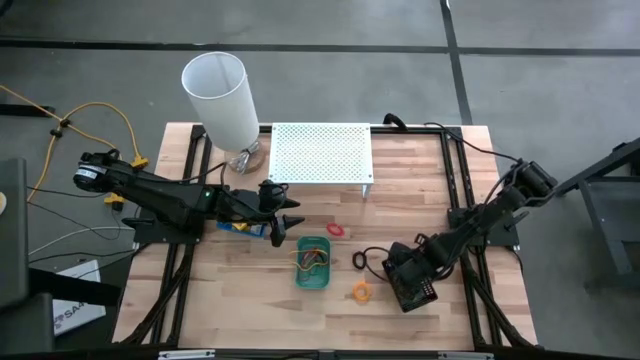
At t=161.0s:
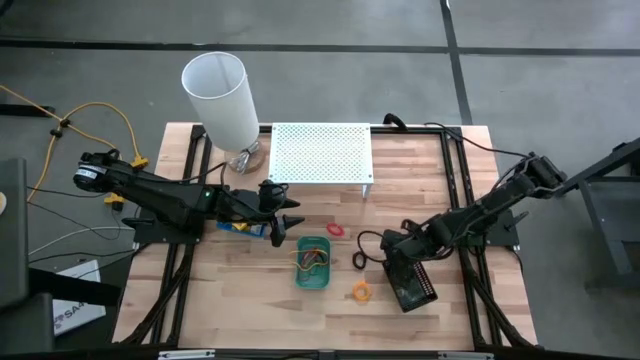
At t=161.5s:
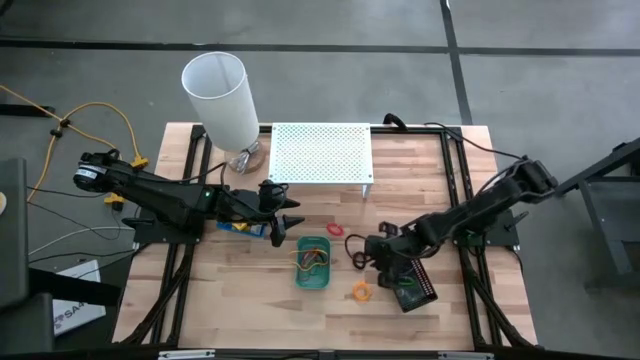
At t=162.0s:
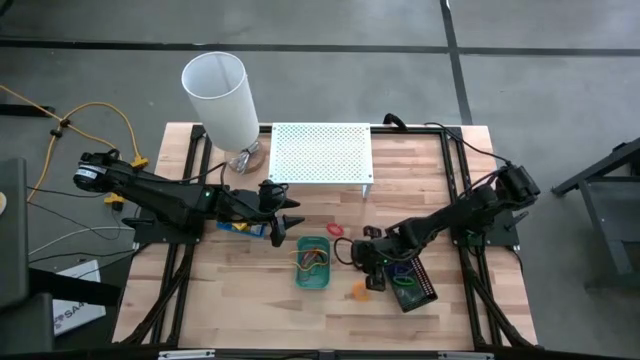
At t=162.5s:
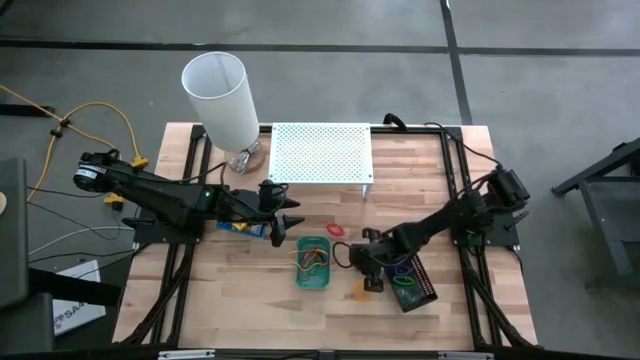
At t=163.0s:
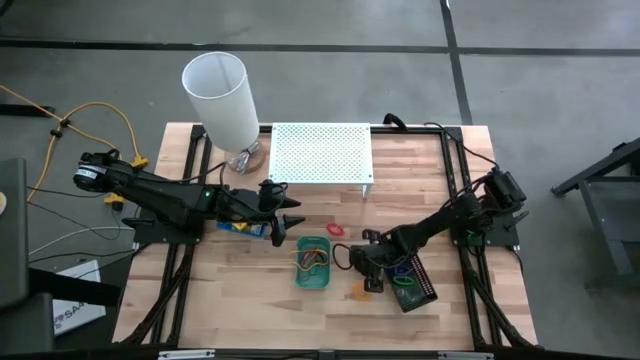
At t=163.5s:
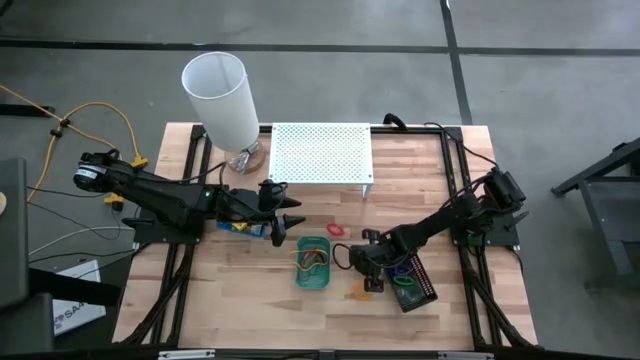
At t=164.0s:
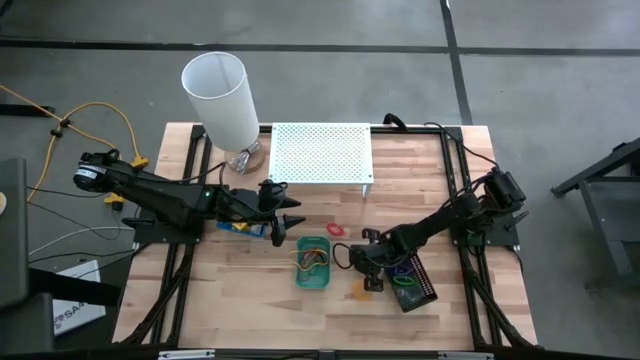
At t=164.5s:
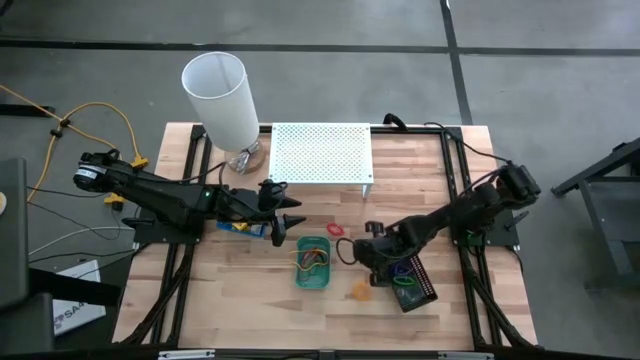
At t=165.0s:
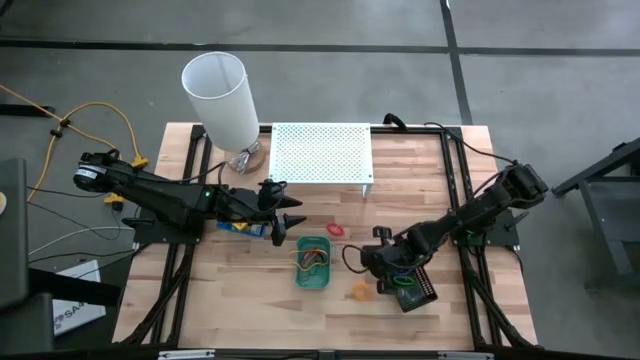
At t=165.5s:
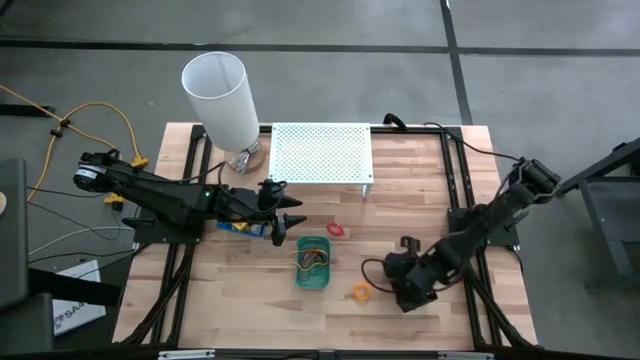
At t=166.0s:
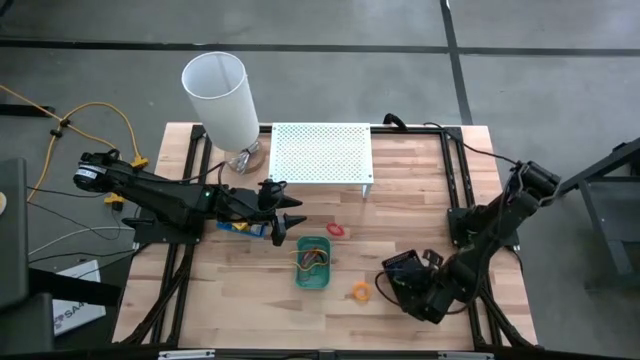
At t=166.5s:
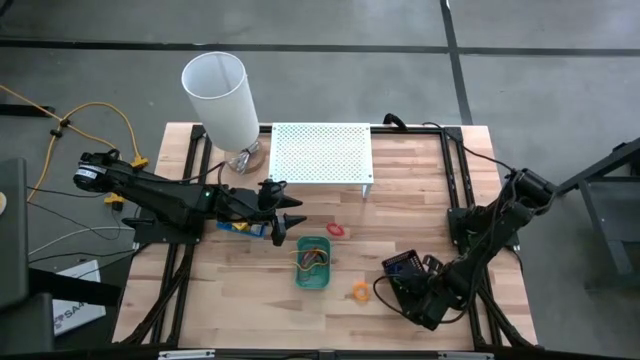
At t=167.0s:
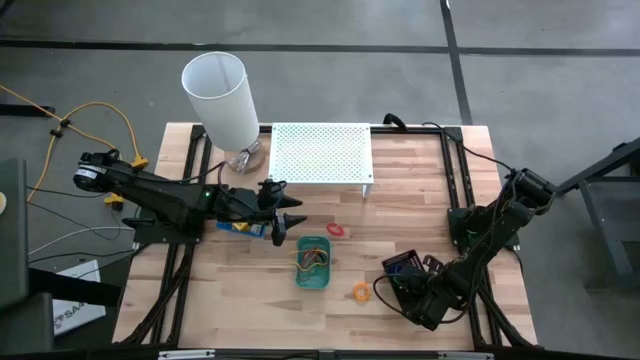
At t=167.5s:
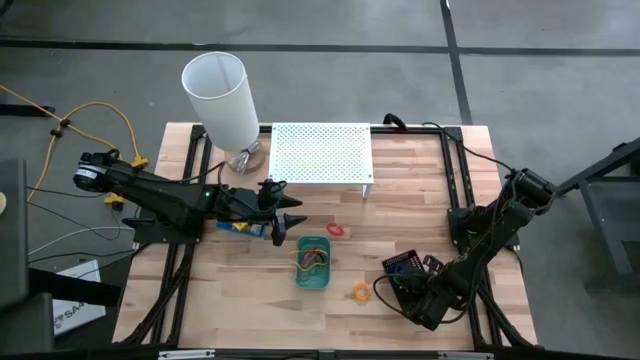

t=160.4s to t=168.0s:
Task: Pick & Place Office Desk Supplies
Put the black spiral keychain band into the black bin

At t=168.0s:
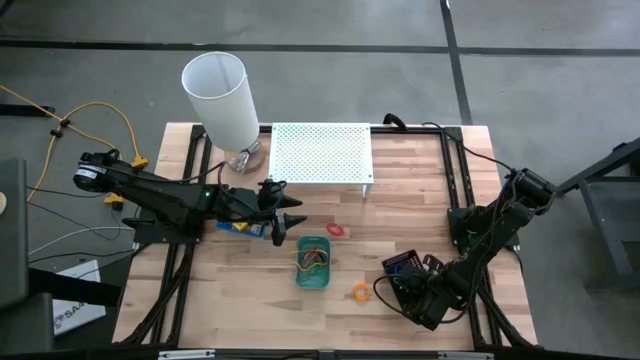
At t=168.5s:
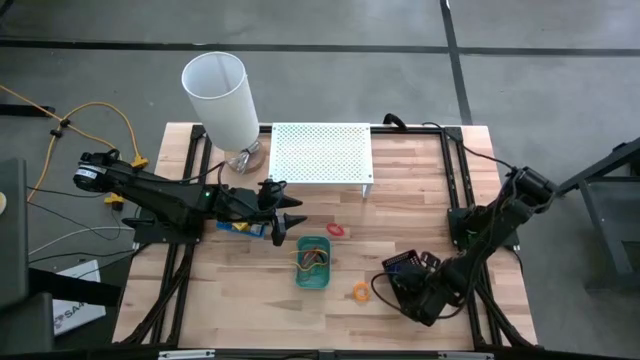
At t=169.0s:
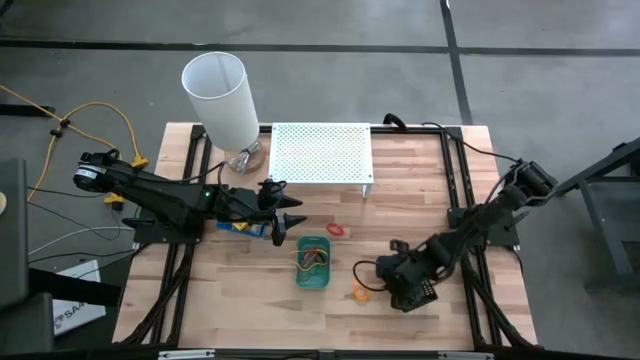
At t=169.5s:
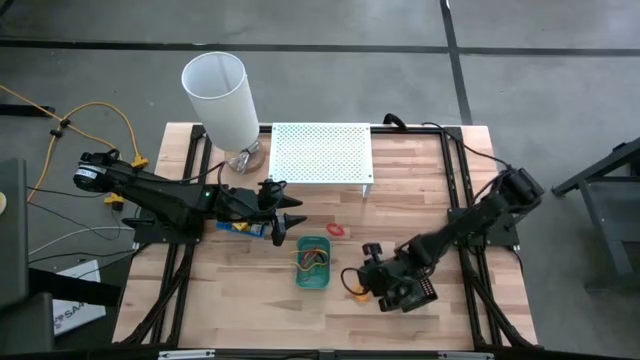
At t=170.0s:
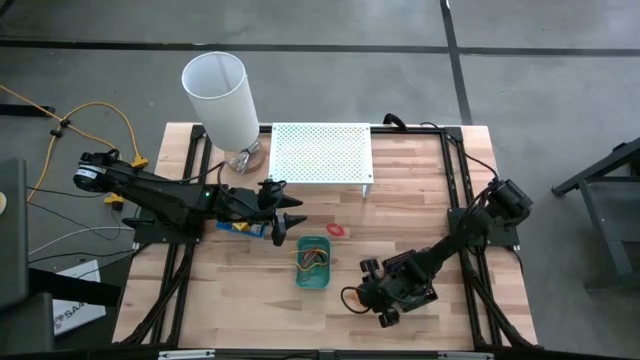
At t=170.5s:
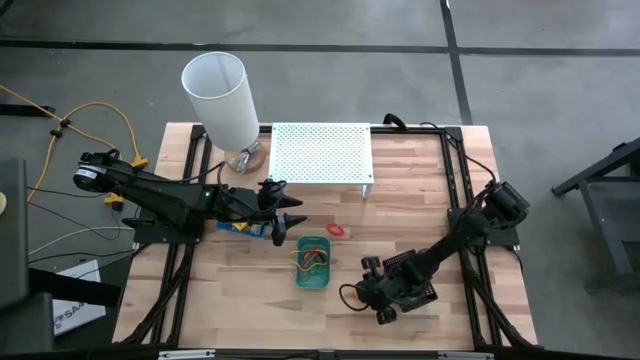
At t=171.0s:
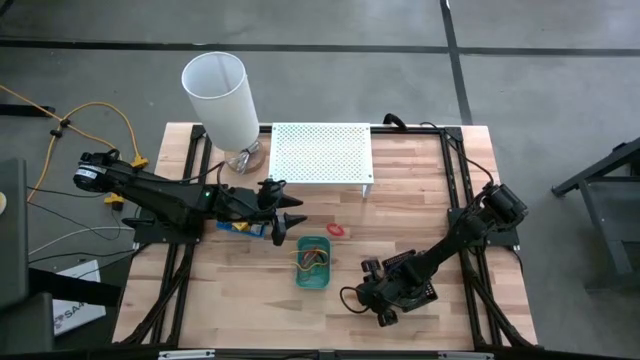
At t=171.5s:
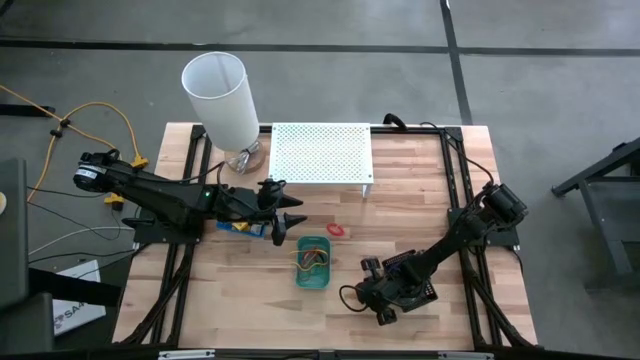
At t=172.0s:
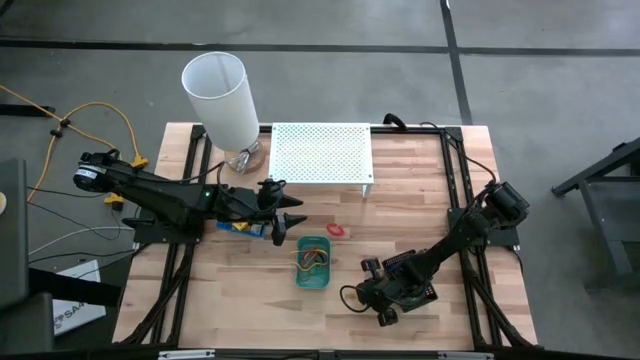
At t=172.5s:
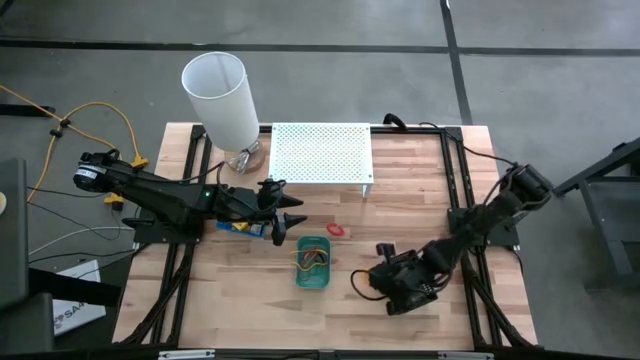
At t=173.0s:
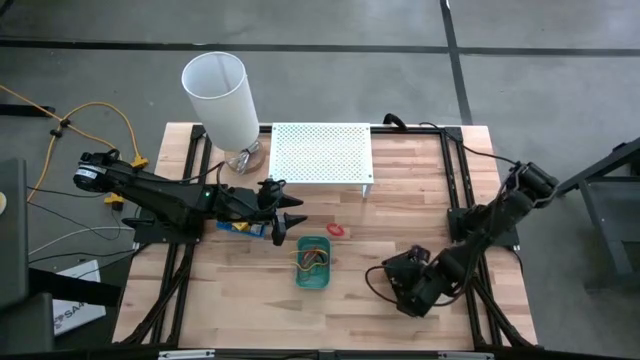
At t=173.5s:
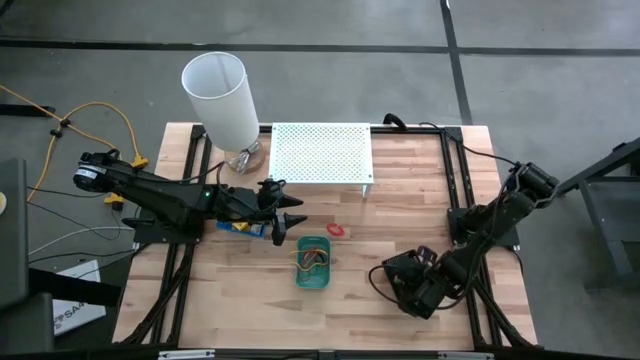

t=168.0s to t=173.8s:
Put the yellow spiral keychain band into the black bin

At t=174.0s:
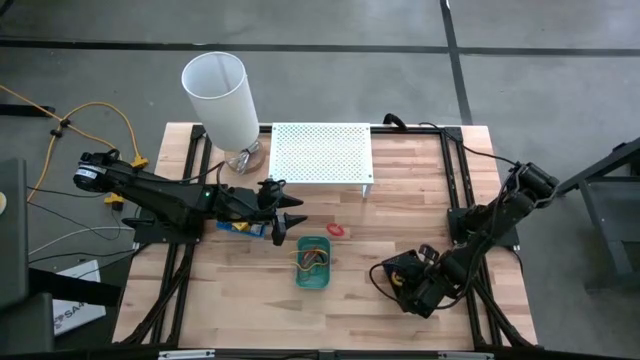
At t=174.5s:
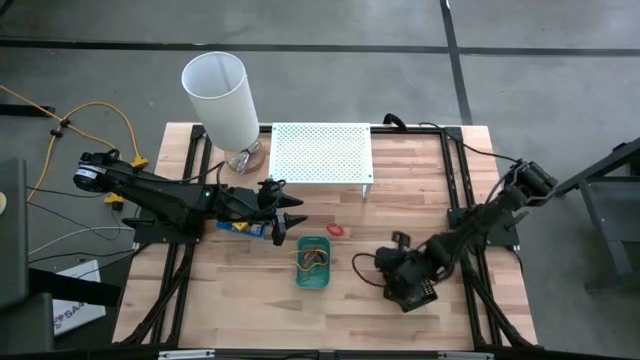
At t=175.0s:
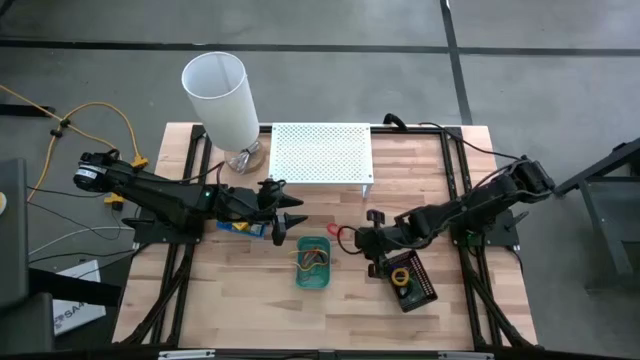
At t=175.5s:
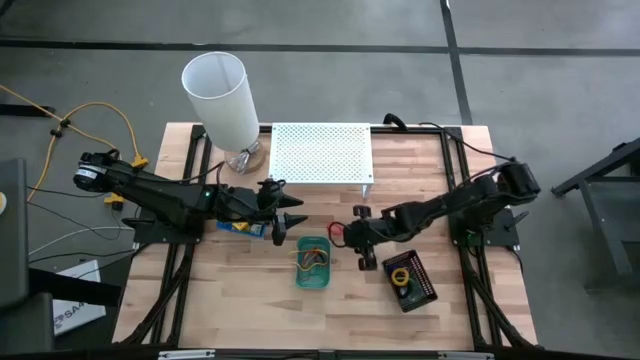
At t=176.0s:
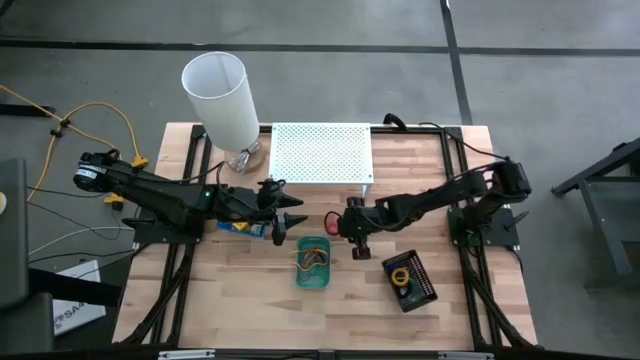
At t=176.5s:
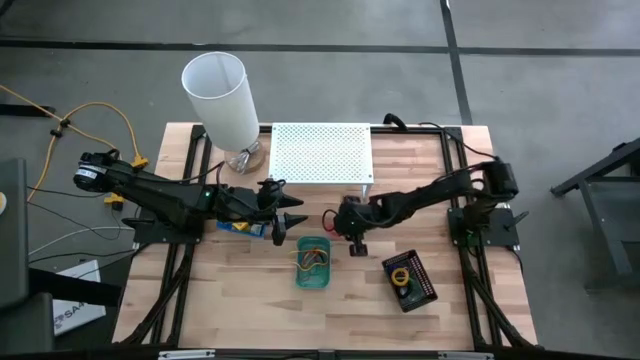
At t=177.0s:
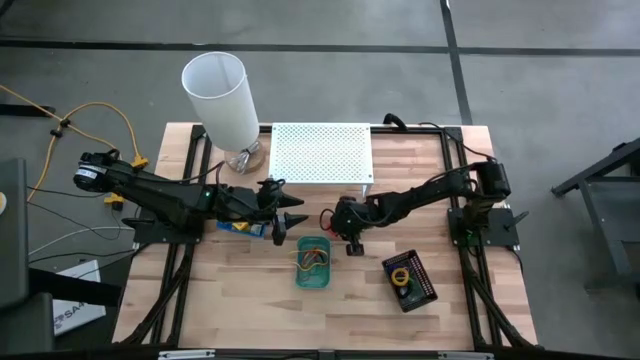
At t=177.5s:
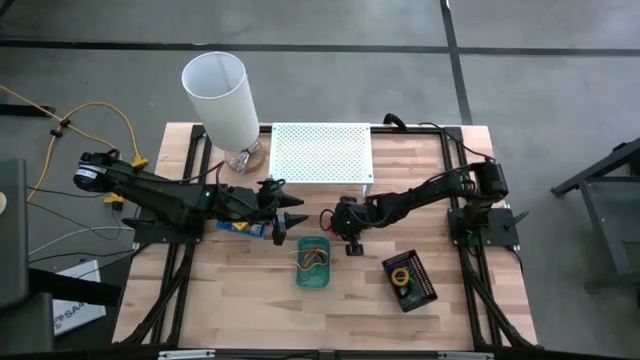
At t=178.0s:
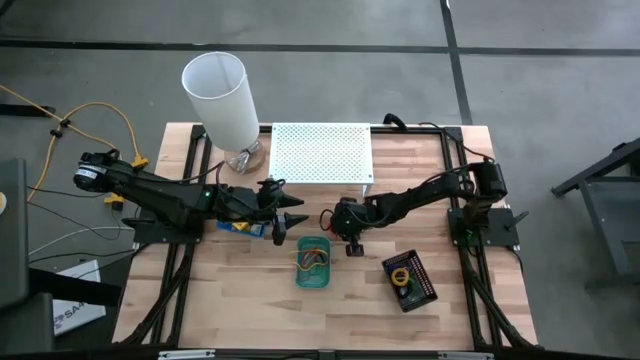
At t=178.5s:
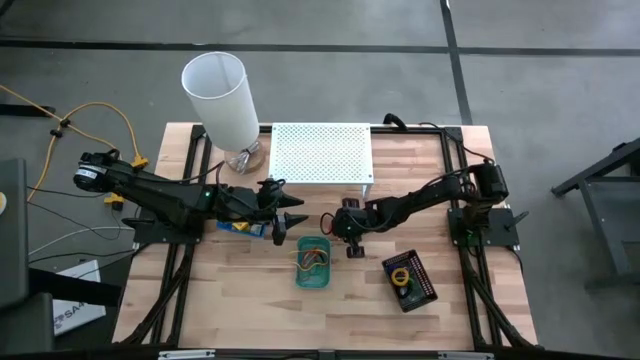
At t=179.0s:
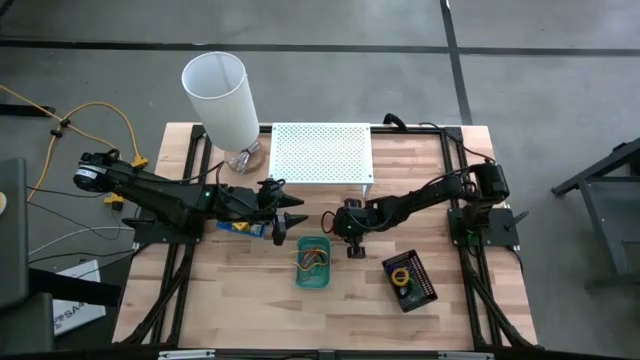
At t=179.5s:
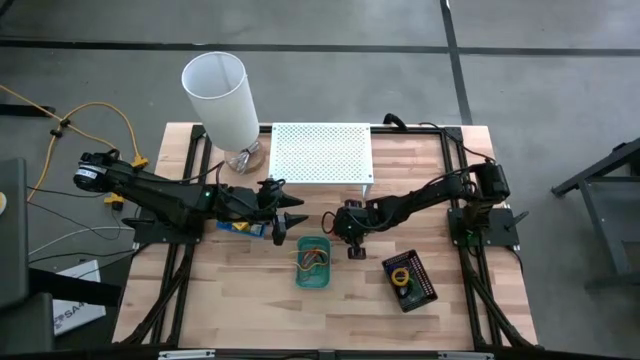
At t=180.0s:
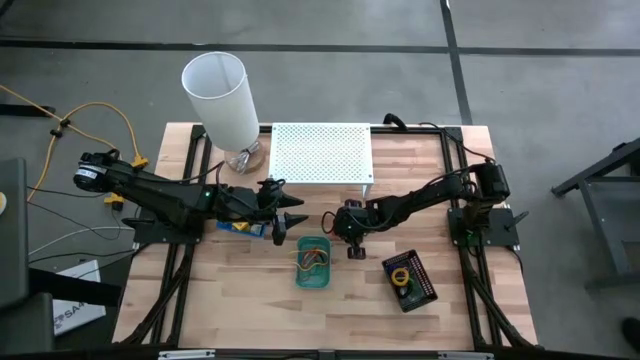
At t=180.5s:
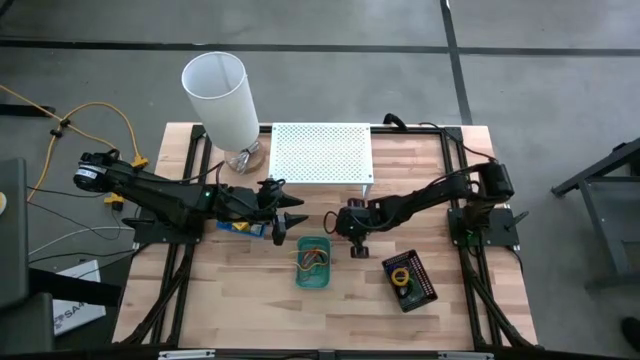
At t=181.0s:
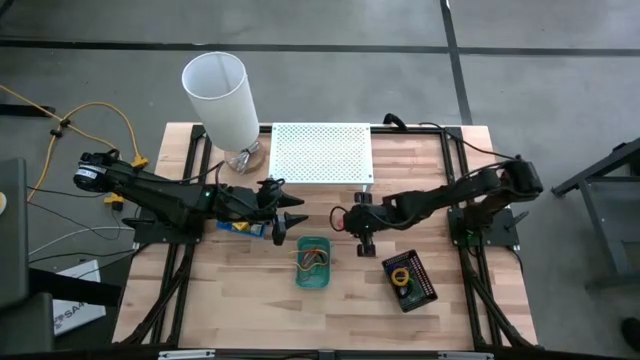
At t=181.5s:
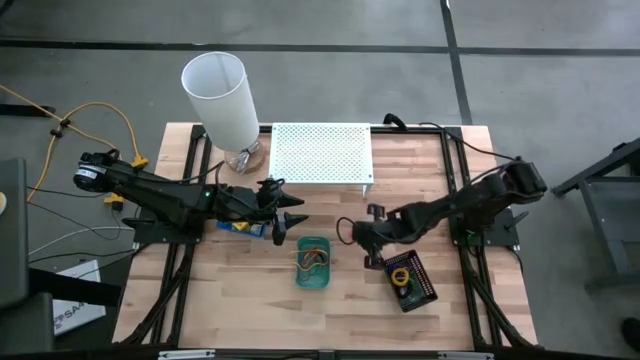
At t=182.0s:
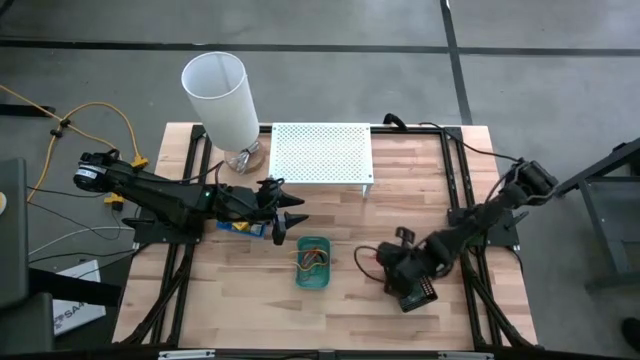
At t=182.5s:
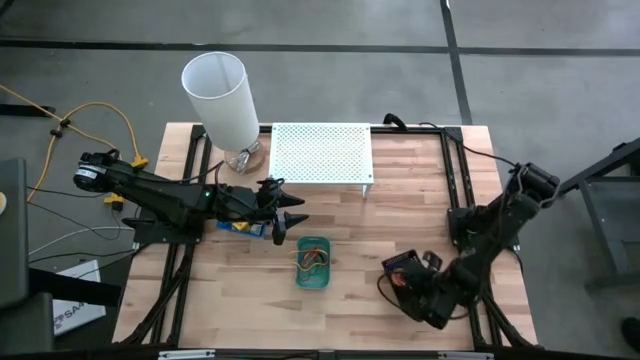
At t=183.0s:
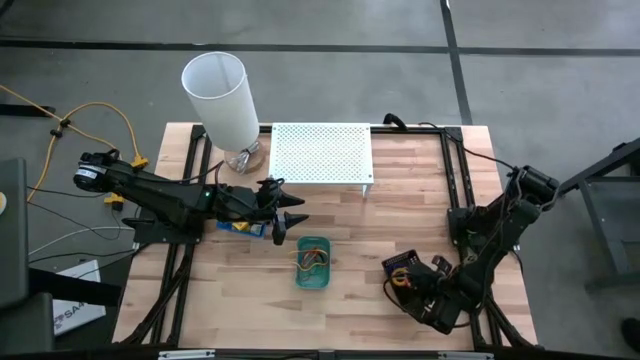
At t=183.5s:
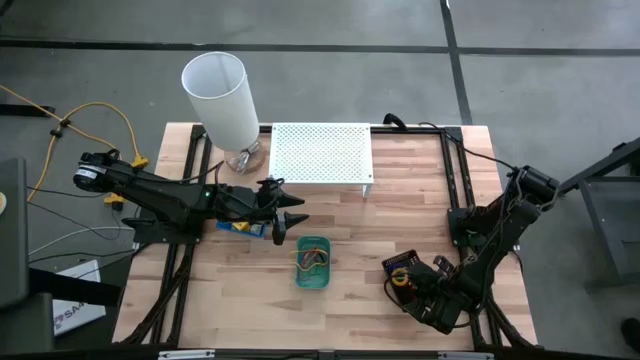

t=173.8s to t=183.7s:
Put the orange spiral keychain band into the black bin
